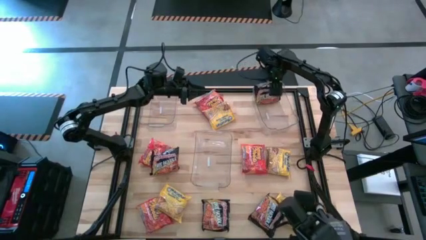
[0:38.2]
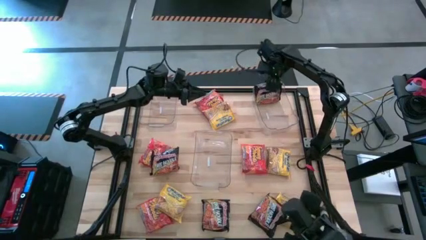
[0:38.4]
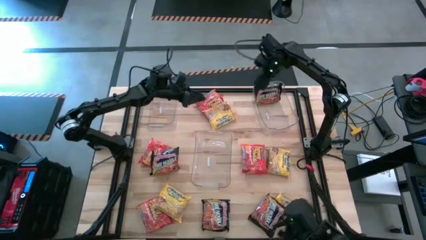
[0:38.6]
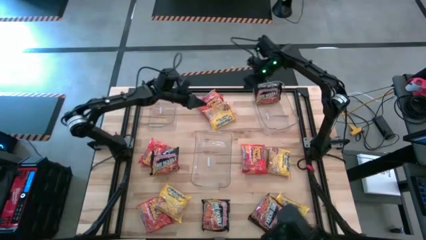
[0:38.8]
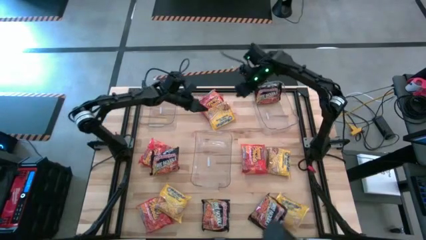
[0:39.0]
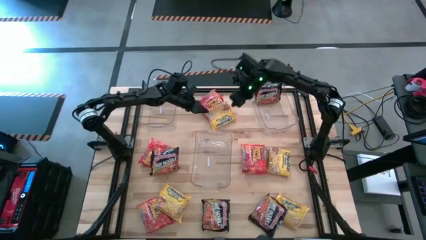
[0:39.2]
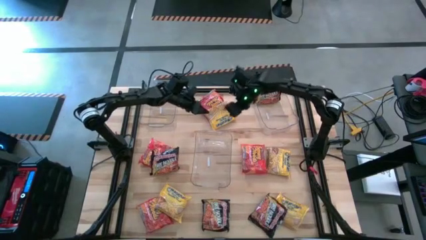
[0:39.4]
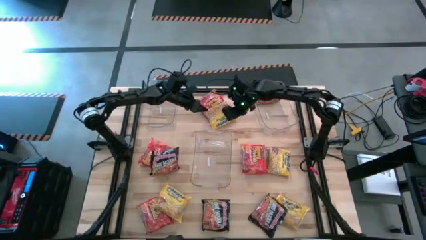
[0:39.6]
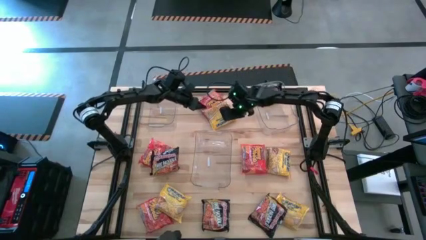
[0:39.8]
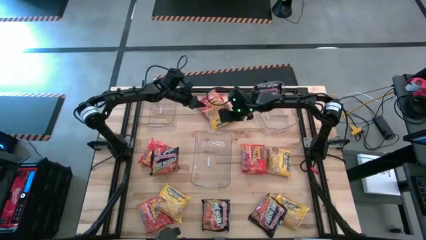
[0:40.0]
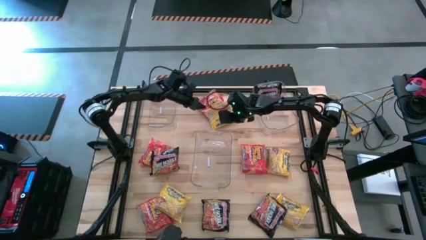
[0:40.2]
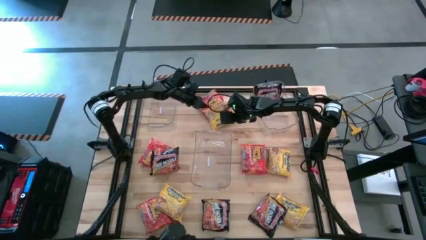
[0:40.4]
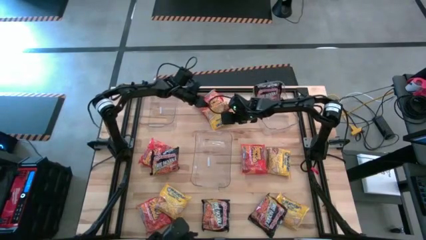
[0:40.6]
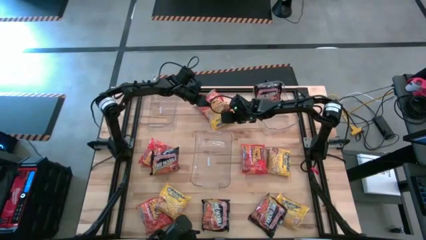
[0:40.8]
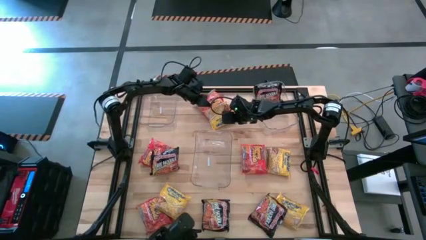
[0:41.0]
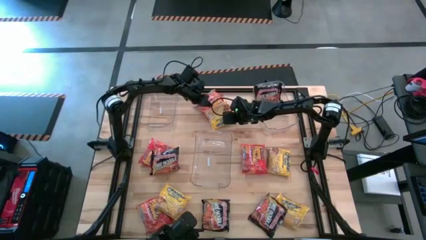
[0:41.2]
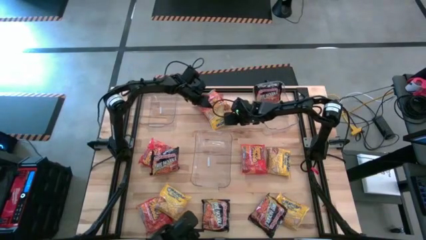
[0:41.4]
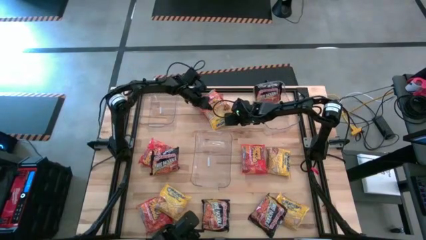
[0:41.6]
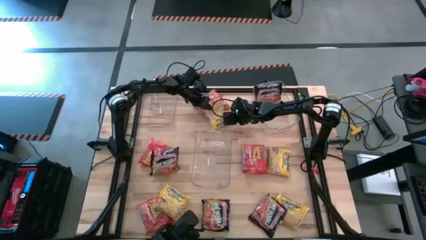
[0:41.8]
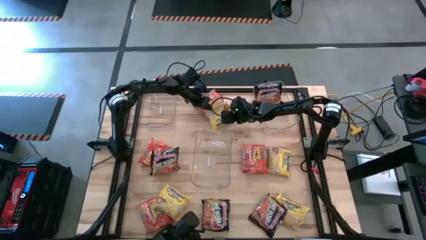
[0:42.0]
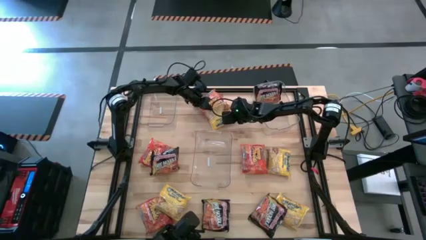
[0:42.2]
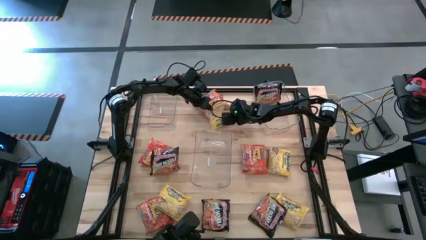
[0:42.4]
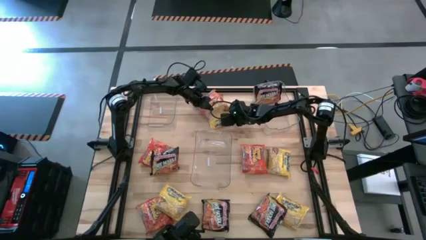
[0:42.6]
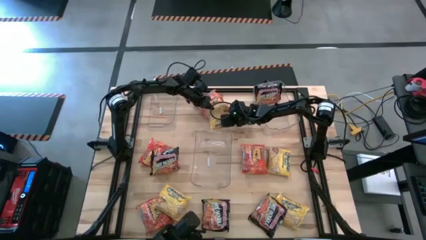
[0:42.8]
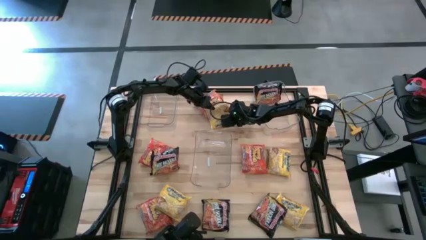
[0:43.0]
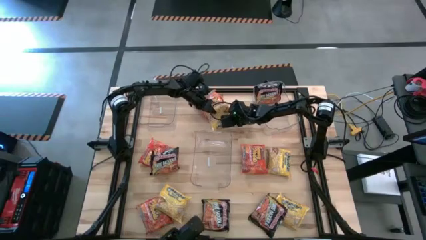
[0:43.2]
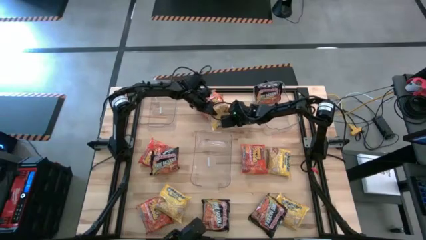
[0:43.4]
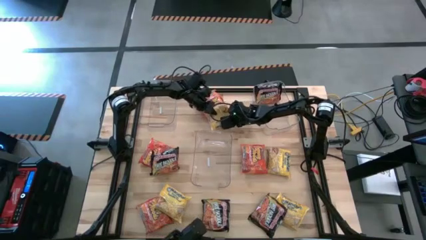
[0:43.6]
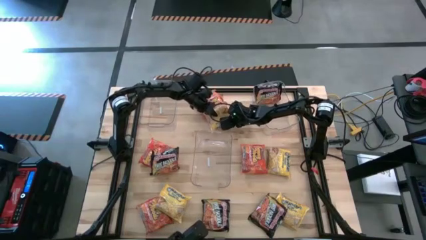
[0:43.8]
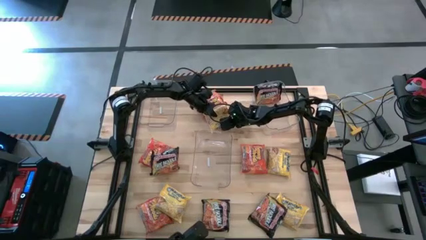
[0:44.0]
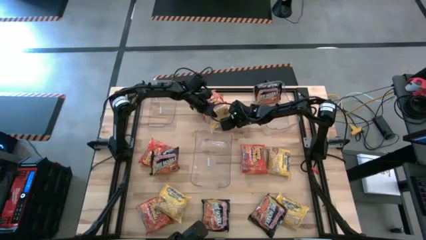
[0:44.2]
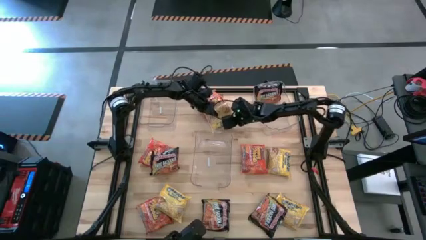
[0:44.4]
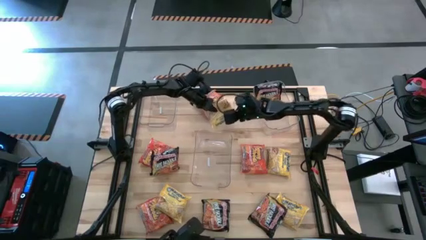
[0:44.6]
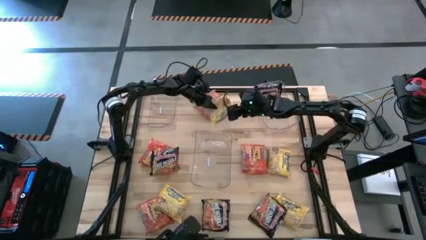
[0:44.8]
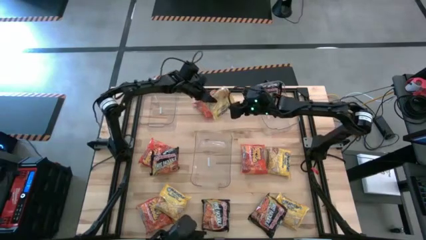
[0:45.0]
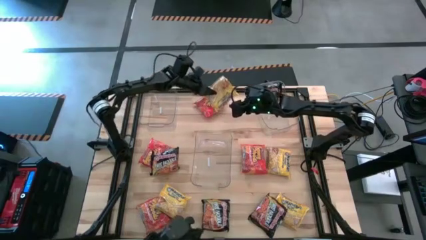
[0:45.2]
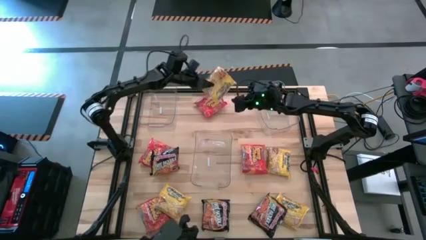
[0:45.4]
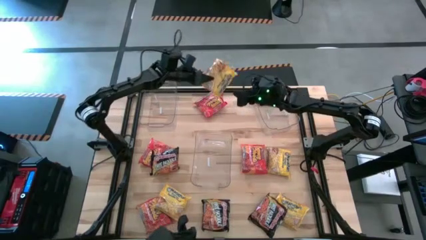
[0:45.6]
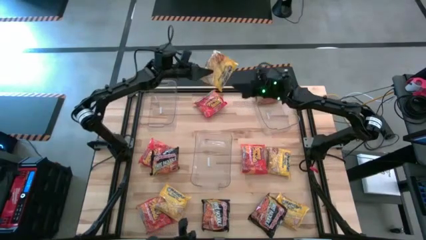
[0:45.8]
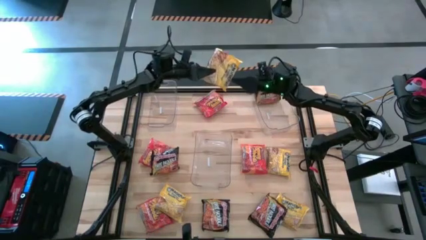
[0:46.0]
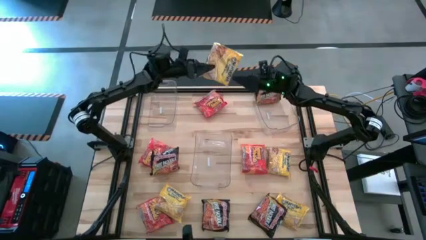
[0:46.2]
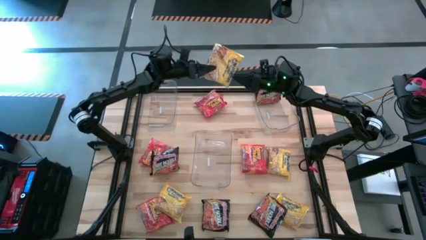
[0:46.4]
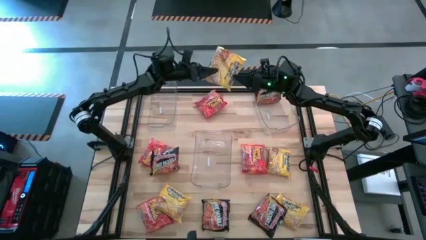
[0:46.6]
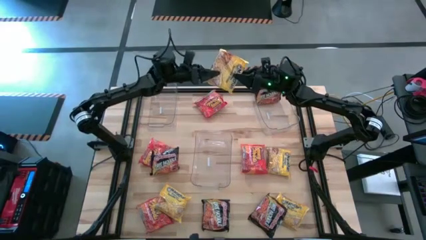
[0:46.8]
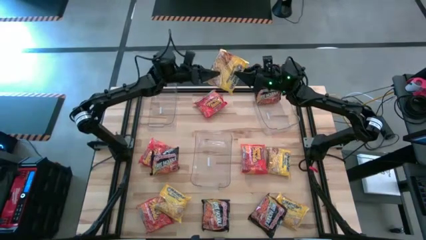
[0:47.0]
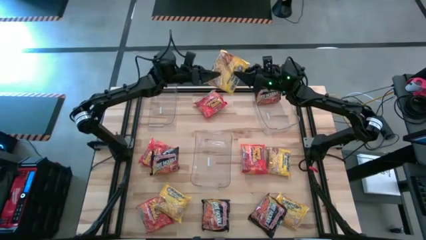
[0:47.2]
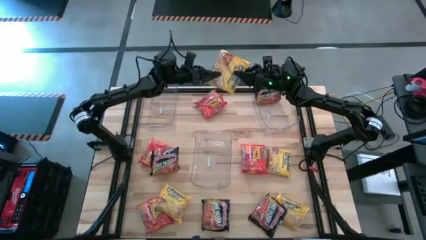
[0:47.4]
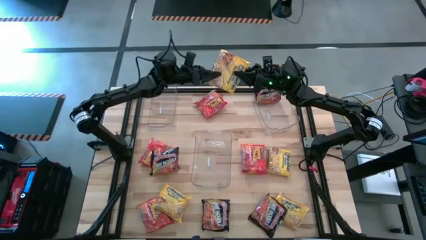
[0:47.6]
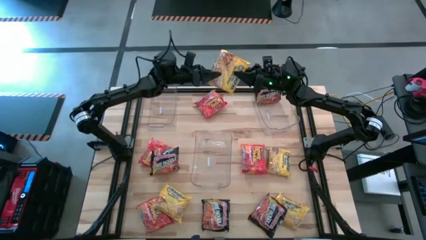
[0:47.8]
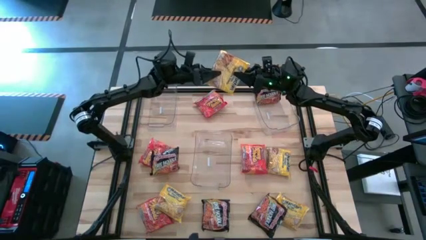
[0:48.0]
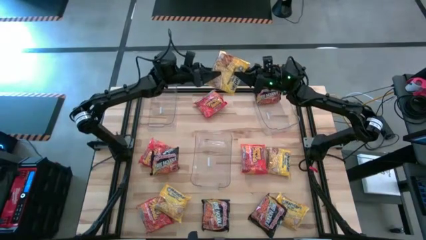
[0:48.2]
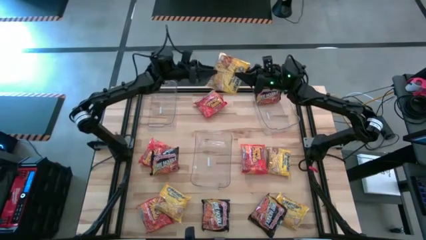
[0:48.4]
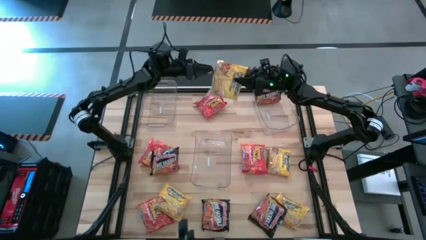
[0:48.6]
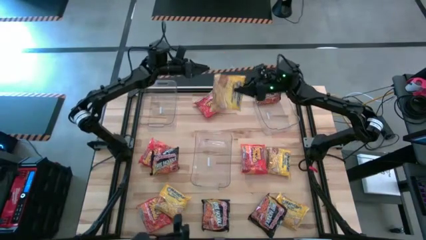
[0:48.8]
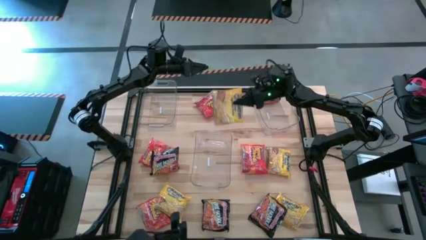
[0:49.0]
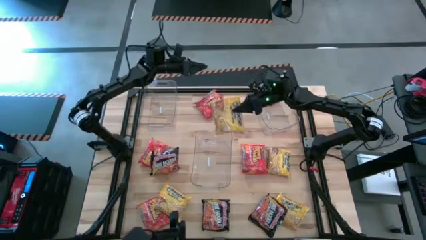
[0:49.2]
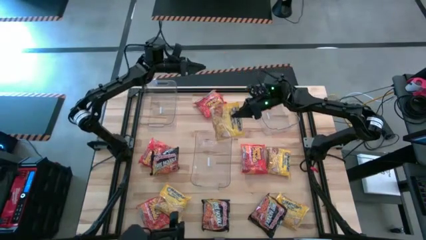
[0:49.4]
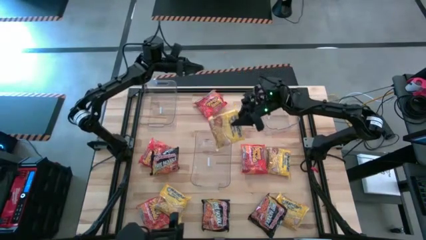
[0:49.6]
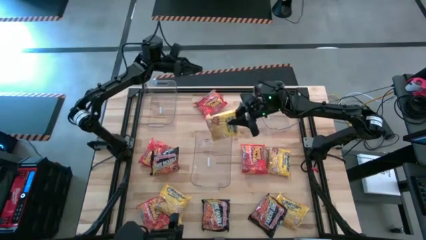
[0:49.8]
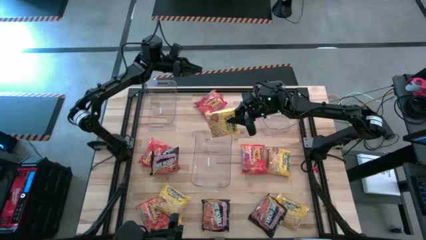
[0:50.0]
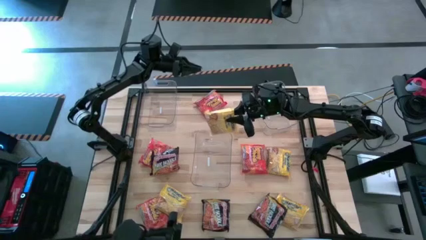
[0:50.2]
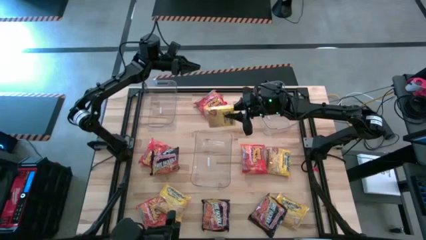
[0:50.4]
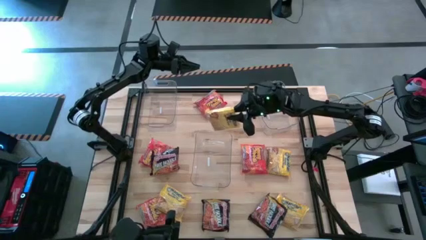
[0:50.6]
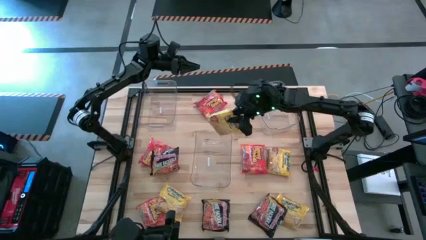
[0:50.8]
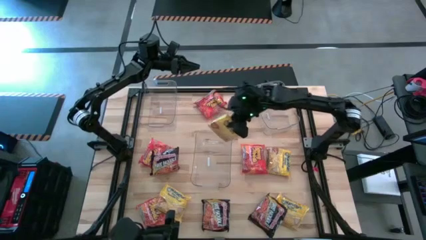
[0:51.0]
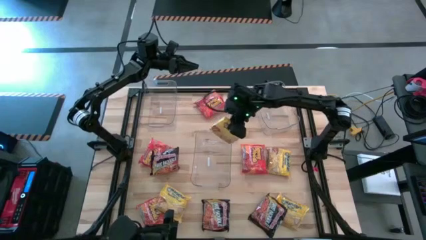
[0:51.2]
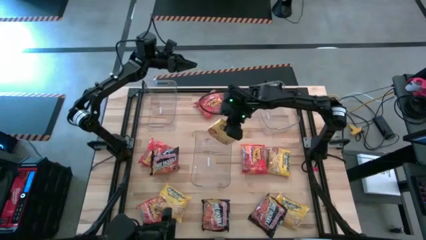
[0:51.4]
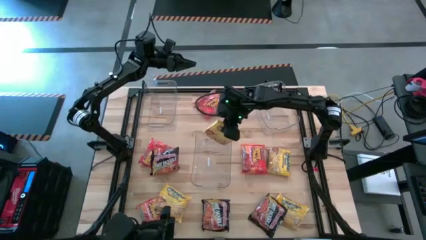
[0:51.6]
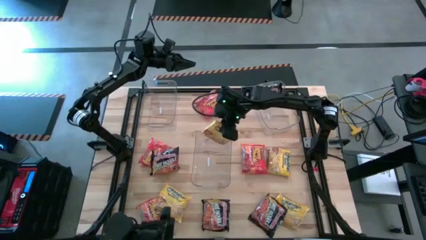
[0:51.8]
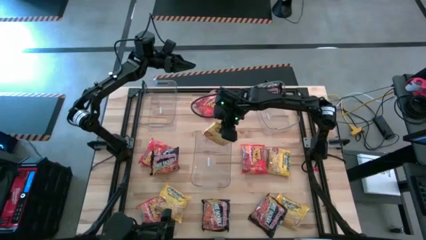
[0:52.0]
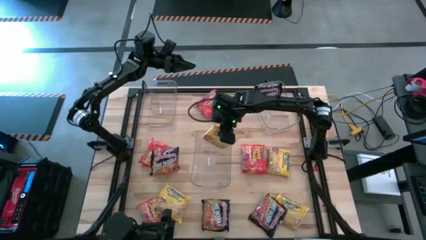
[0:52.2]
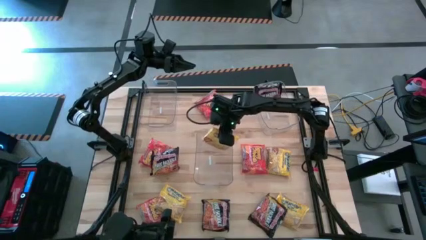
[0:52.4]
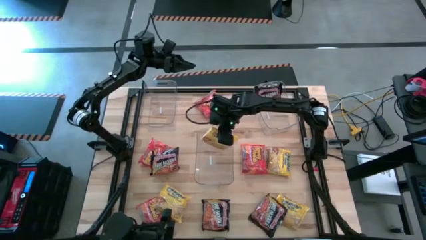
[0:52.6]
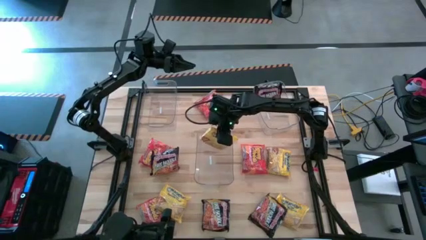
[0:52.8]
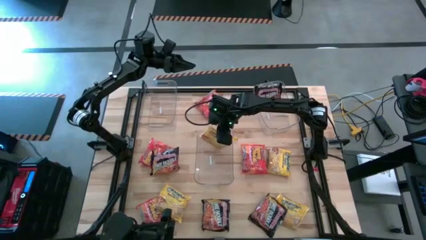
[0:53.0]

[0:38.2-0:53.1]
Task: Sort Maruchan noodles
Put the yellow noodle pack into the center transparent bin

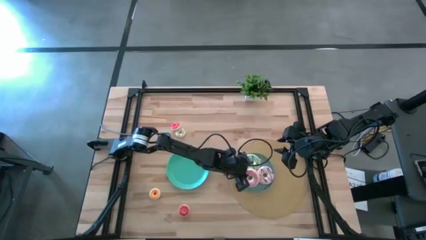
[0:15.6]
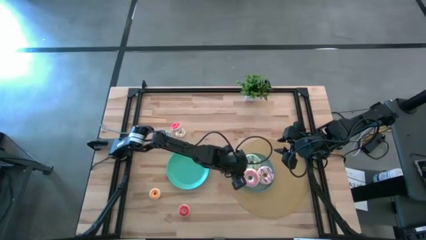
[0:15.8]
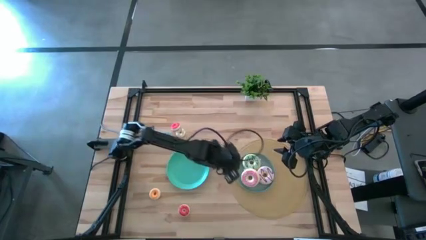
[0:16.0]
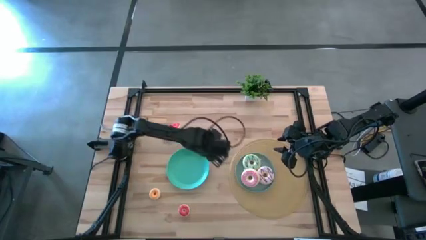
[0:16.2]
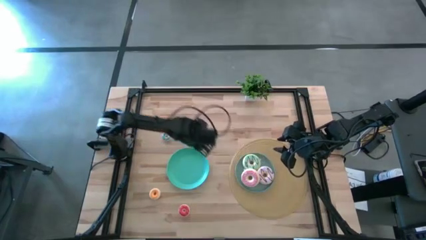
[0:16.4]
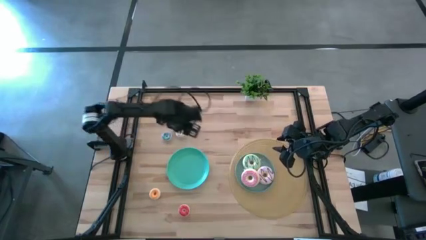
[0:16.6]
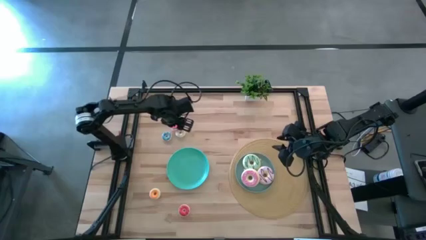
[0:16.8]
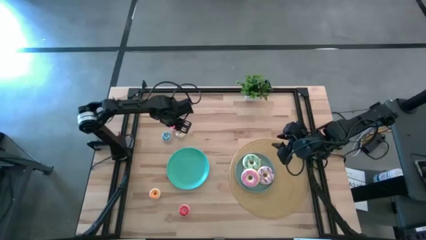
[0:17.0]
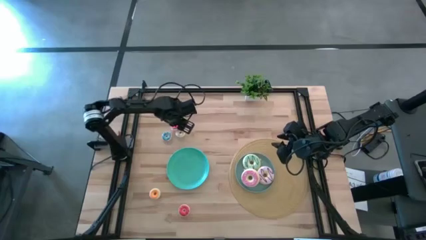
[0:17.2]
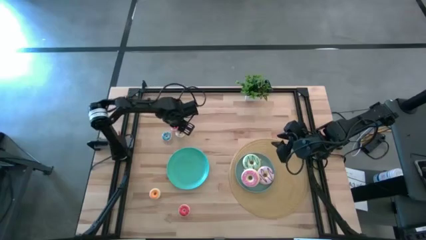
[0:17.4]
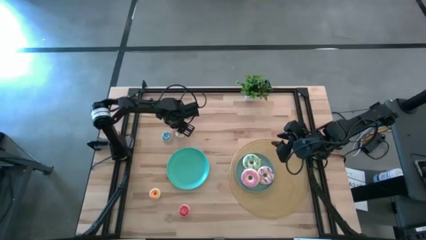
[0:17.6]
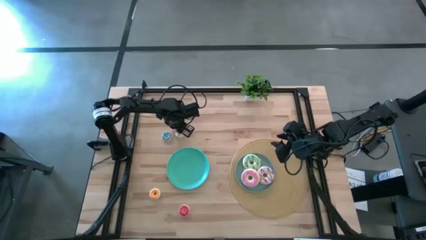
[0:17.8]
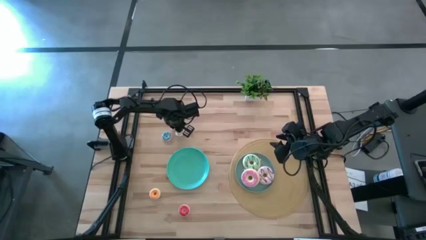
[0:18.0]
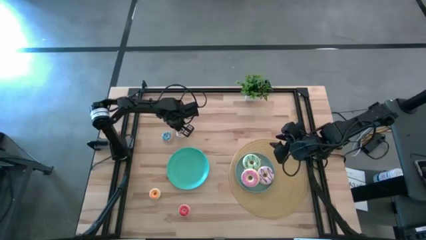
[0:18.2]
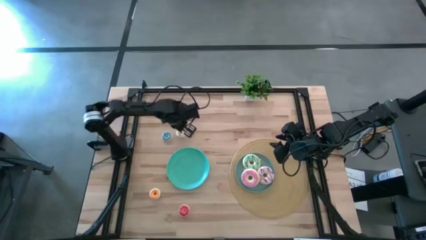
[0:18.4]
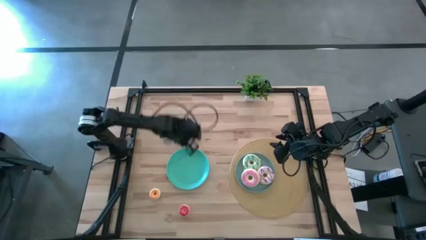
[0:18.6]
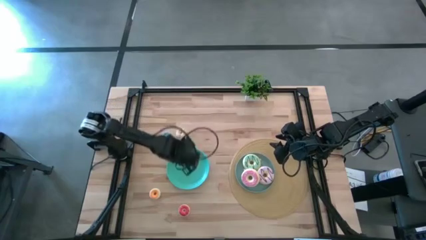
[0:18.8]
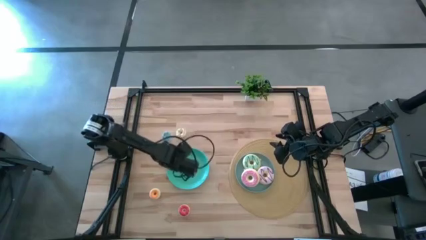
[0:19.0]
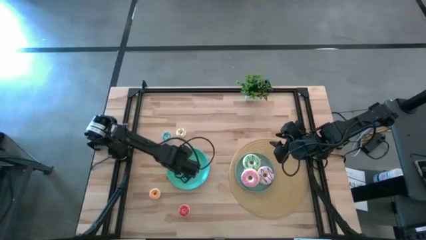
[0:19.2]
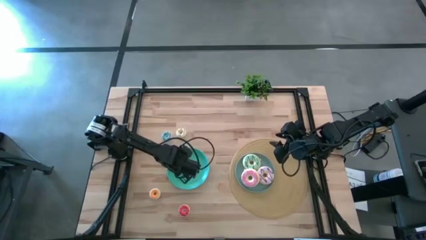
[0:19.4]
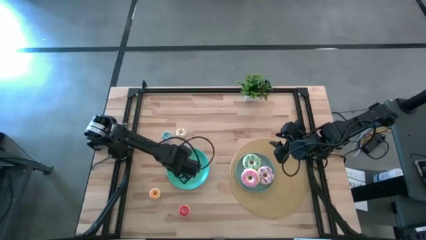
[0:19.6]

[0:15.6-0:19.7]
Task: Pick & Place donuts
Put the small red donut on the green plate
